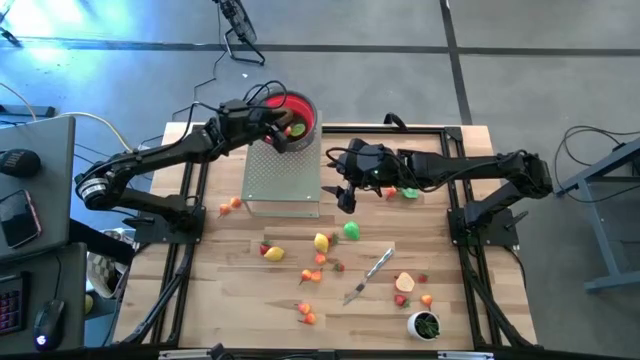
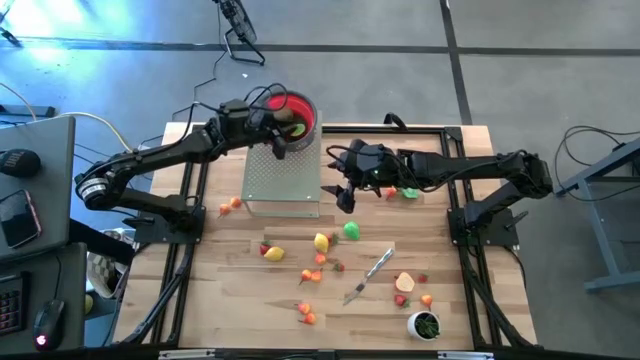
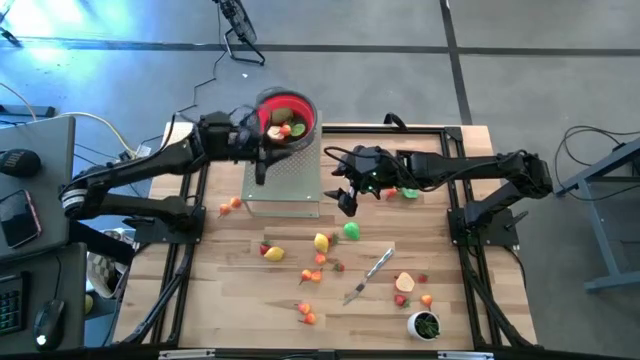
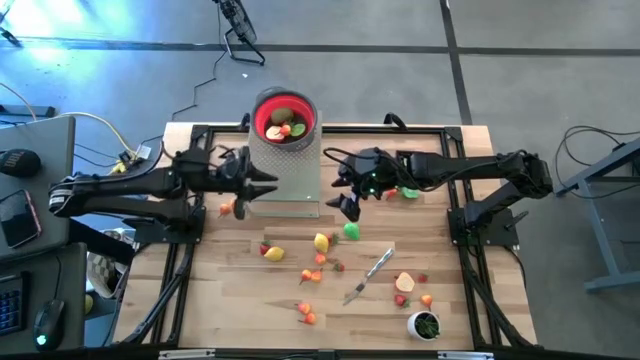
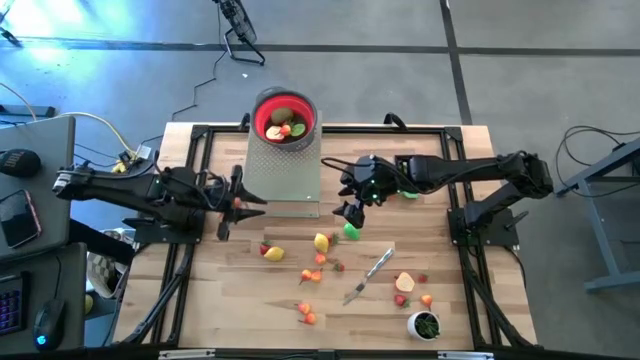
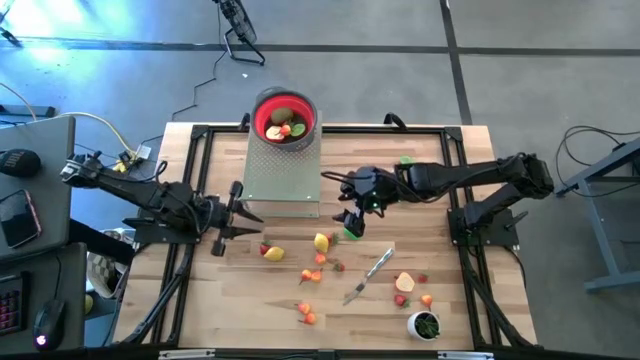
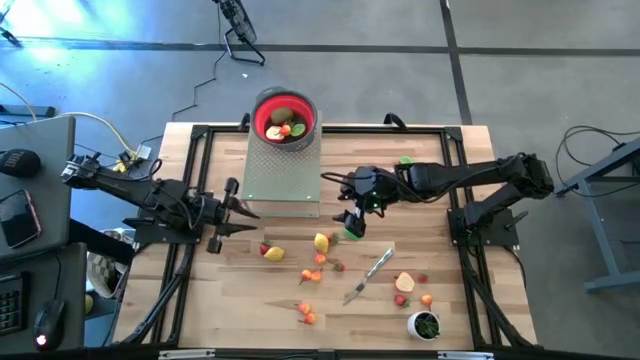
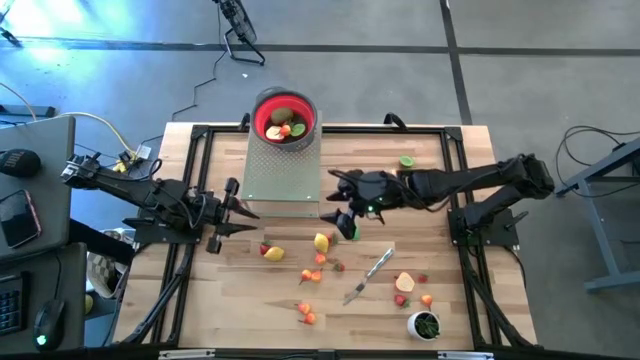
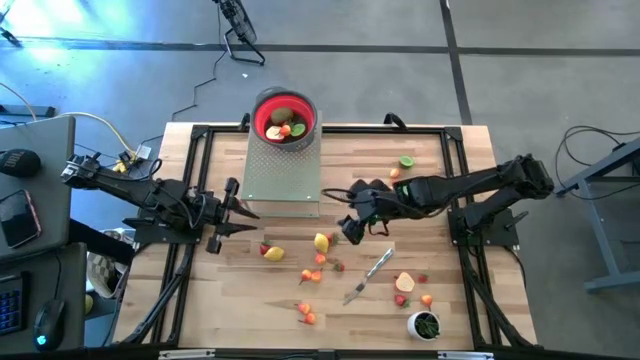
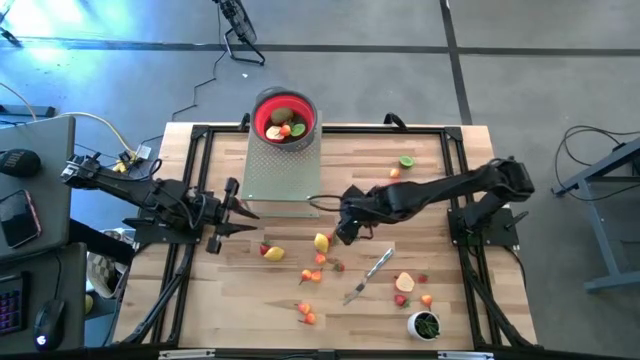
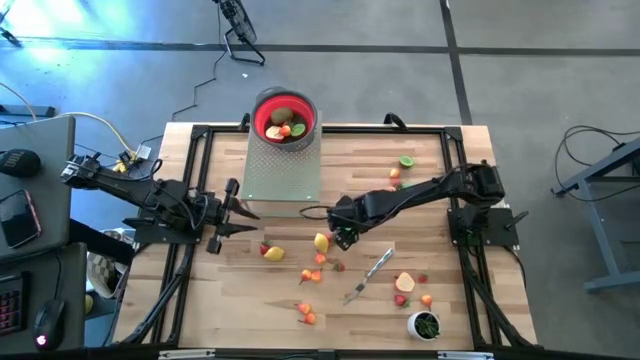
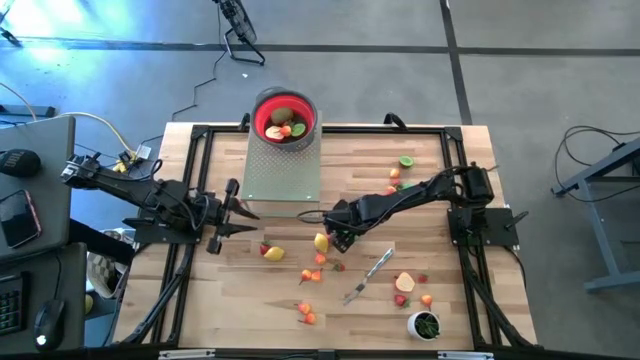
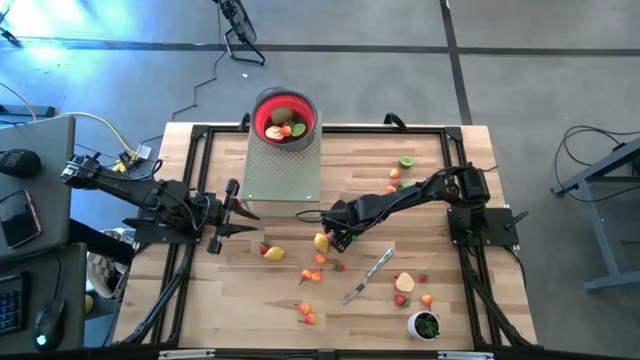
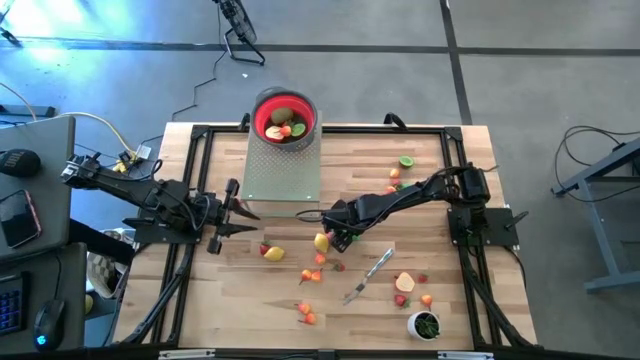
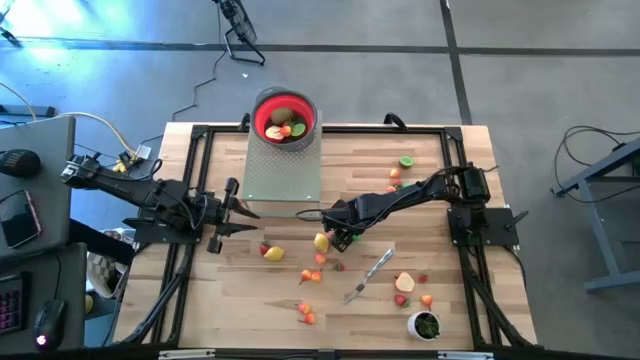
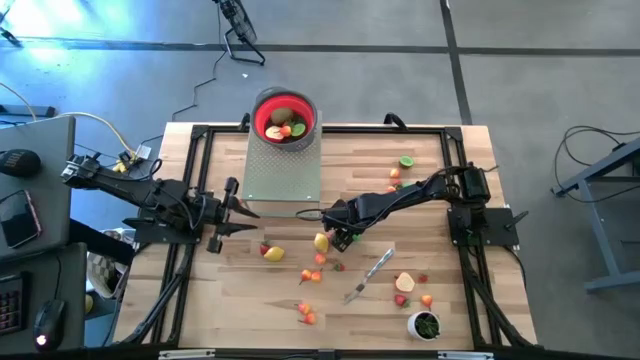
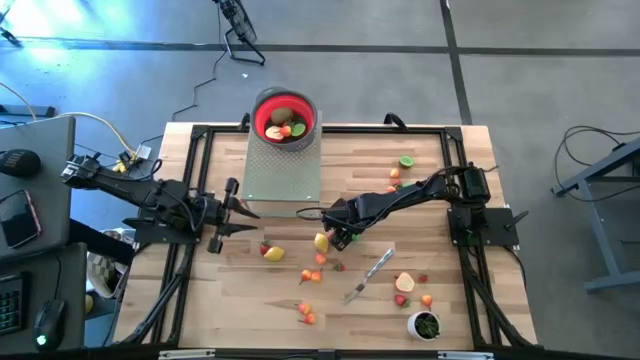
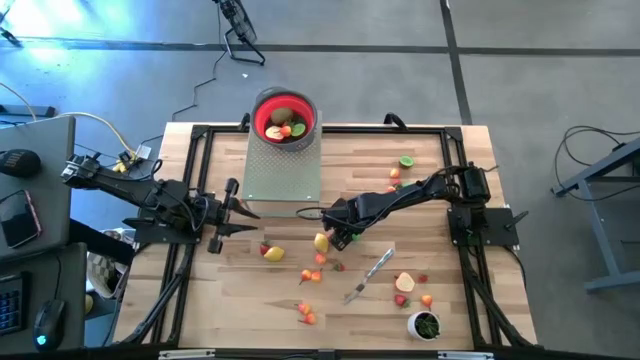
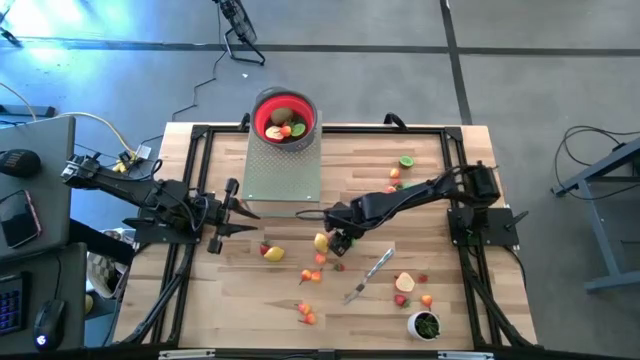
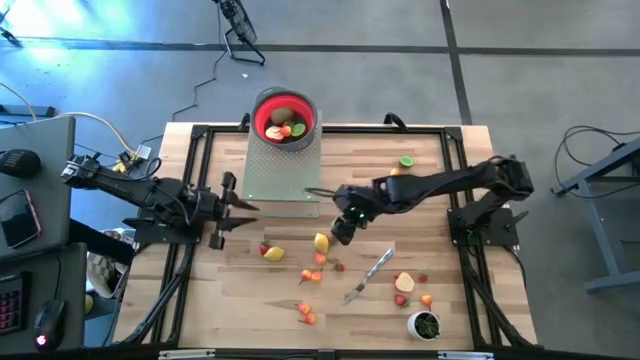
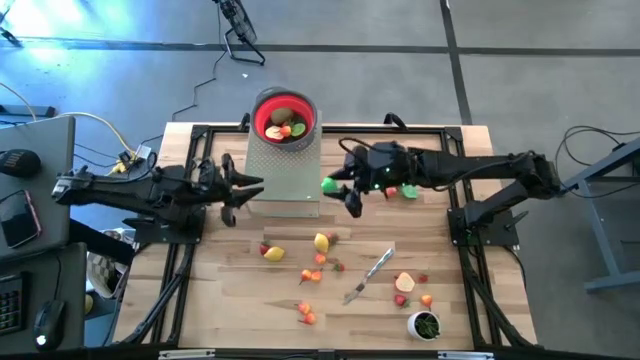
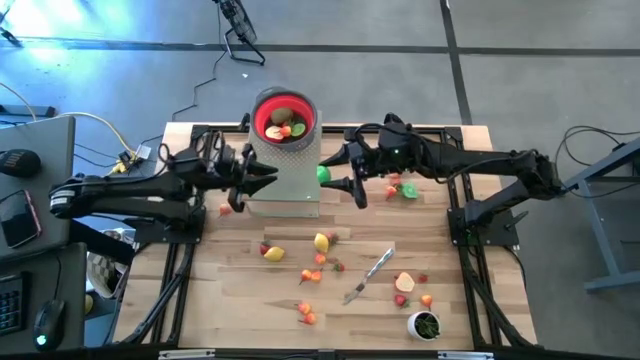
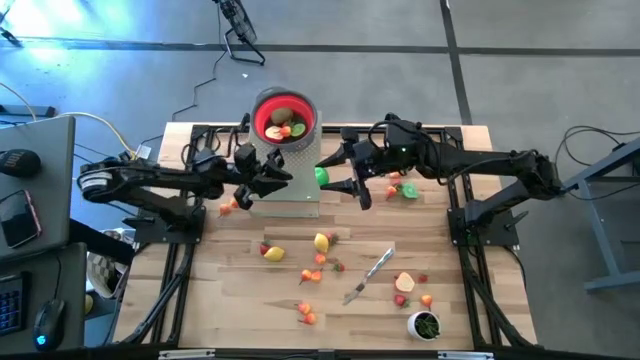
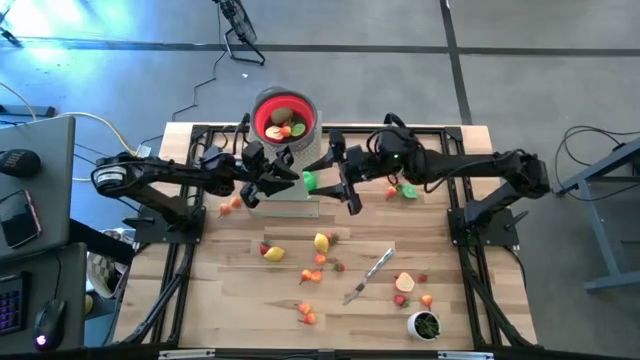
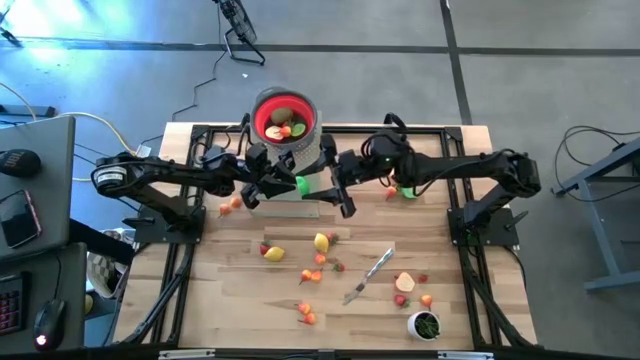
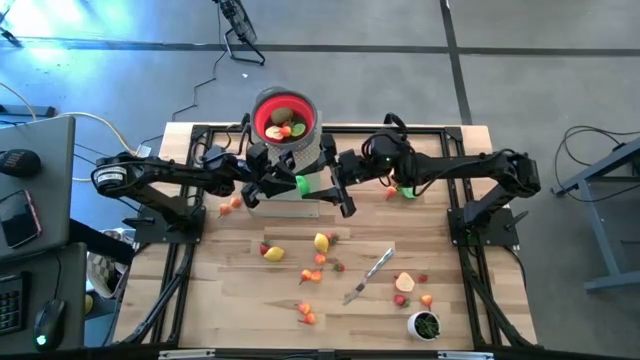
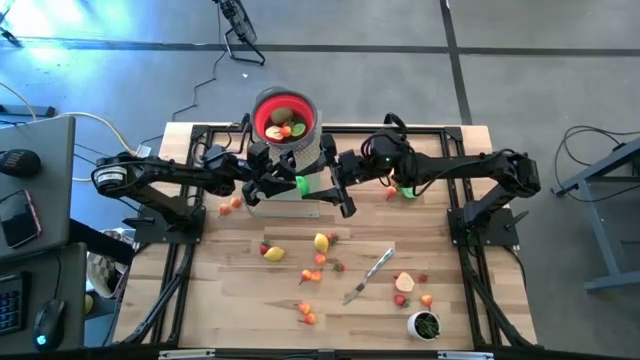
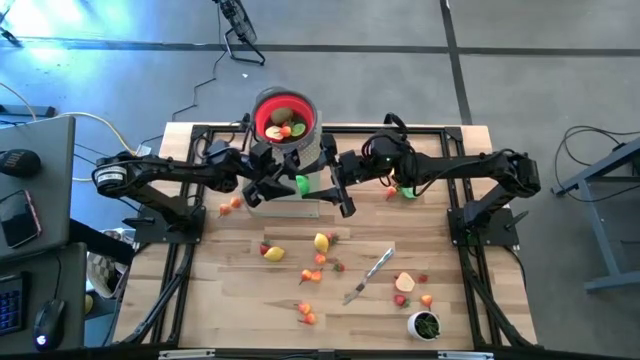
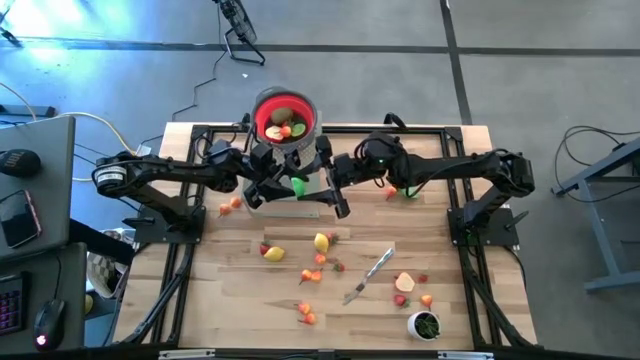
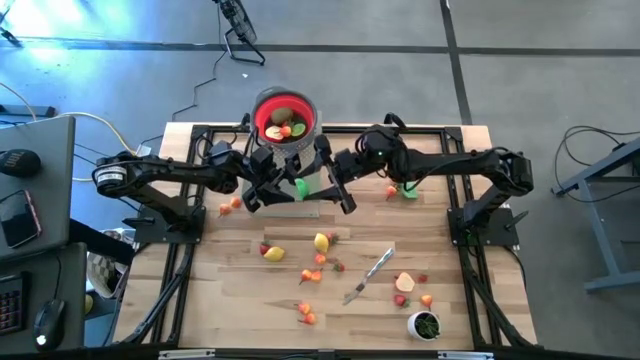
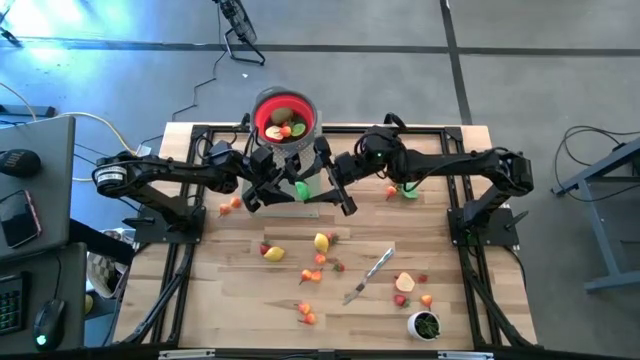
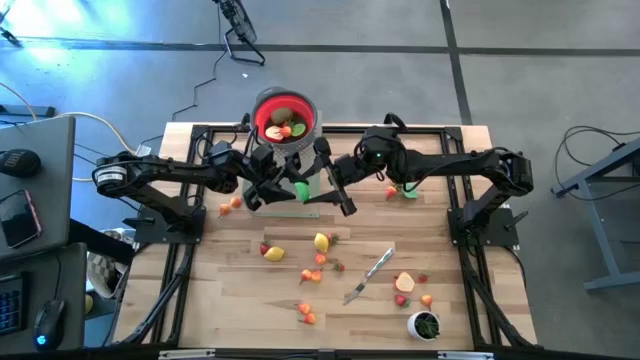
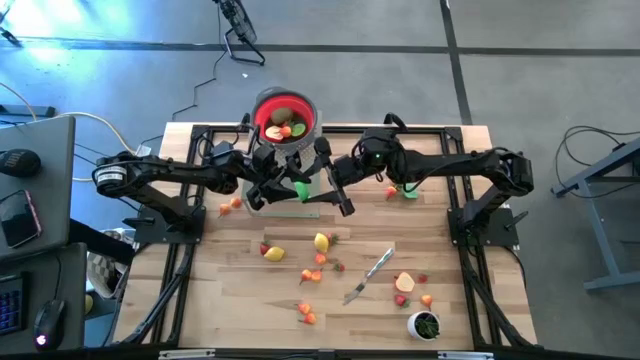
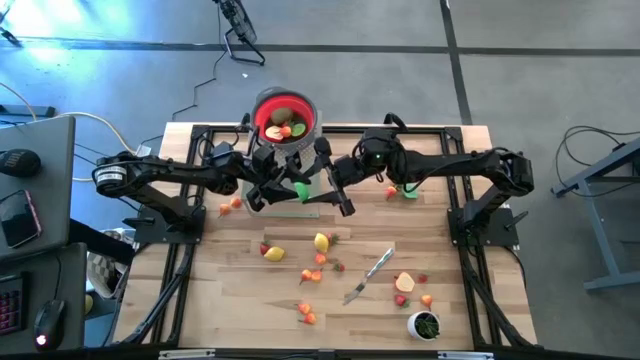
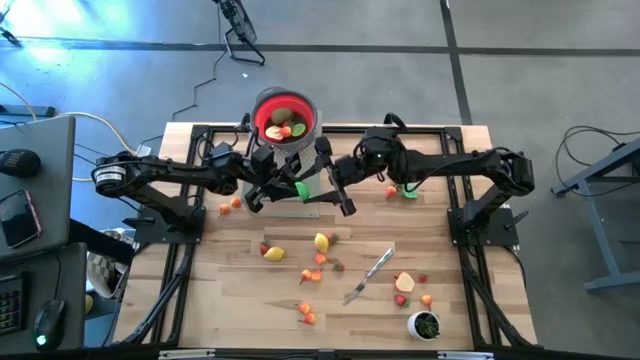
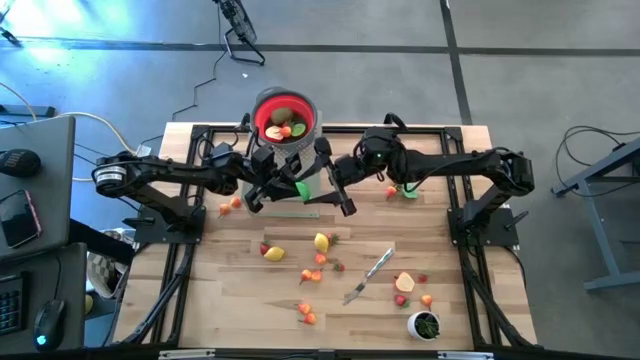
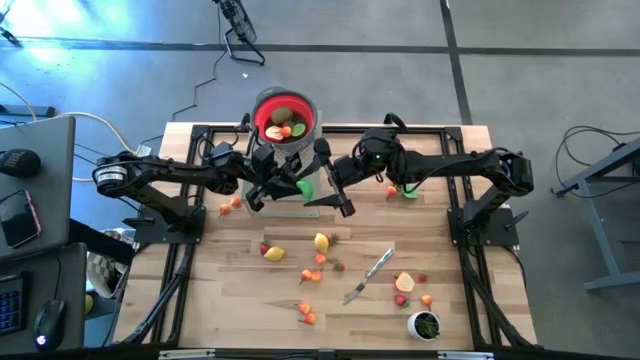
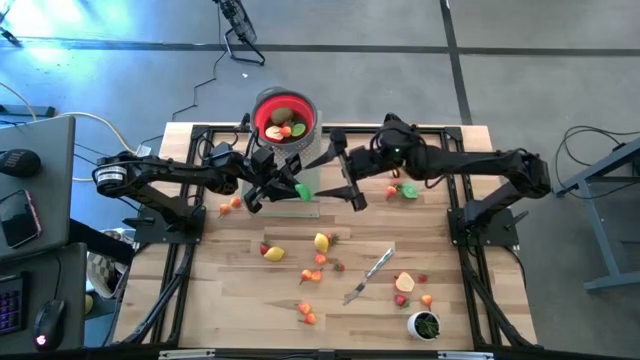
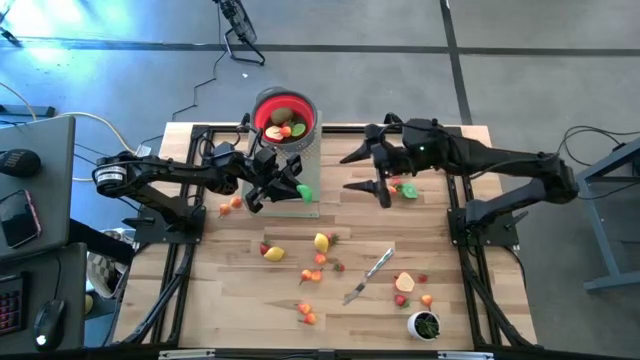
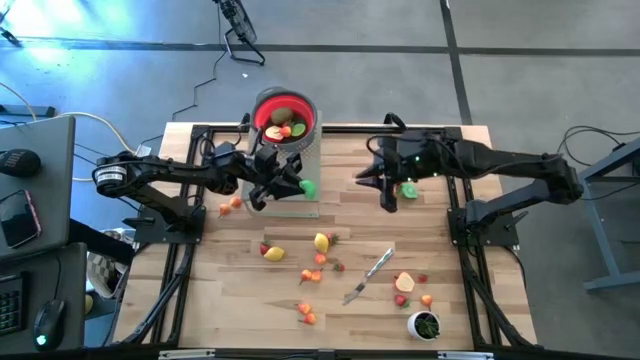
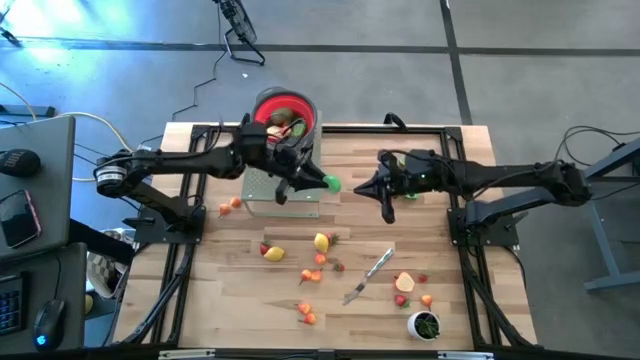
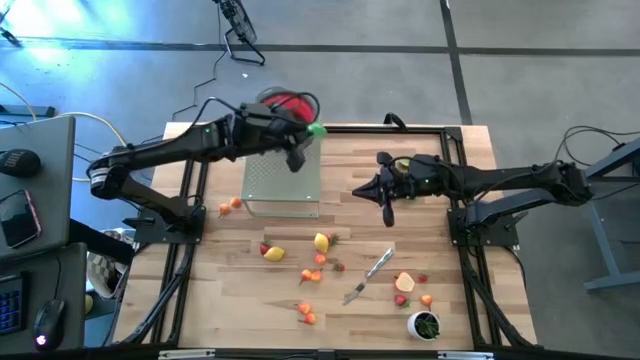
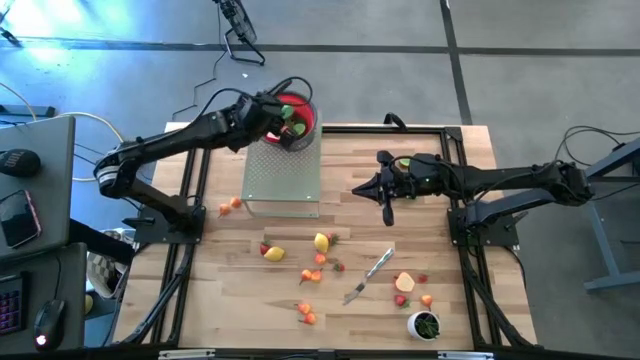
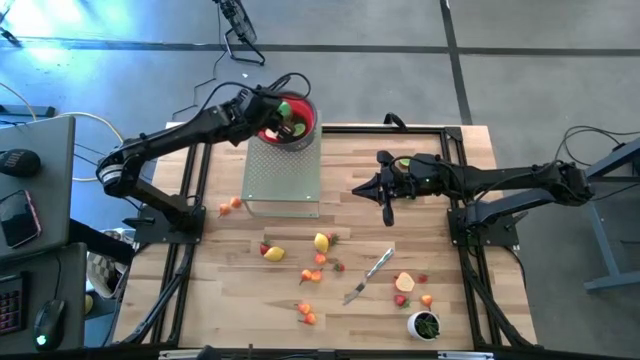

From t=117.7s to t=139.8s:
Task: Pick & Place Fruit
Put the green half pear into the red strainer on the shelf
